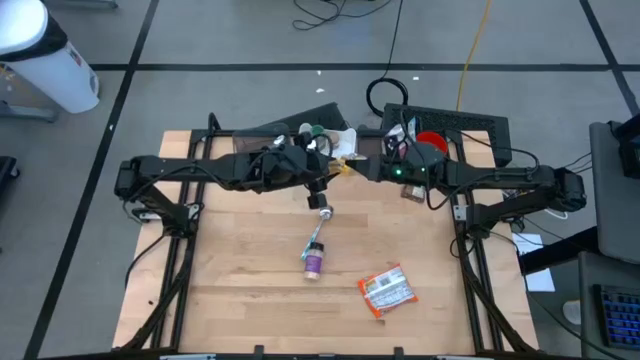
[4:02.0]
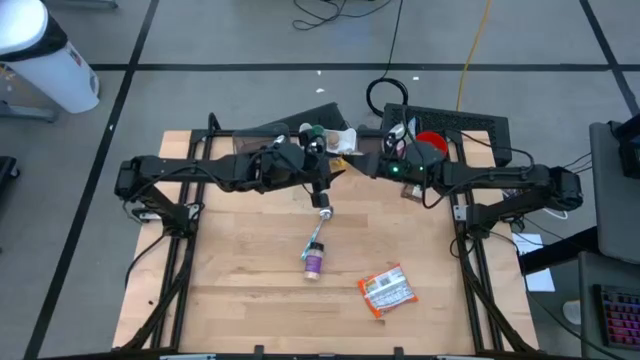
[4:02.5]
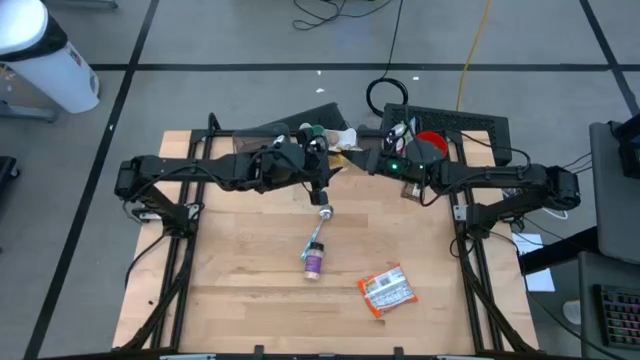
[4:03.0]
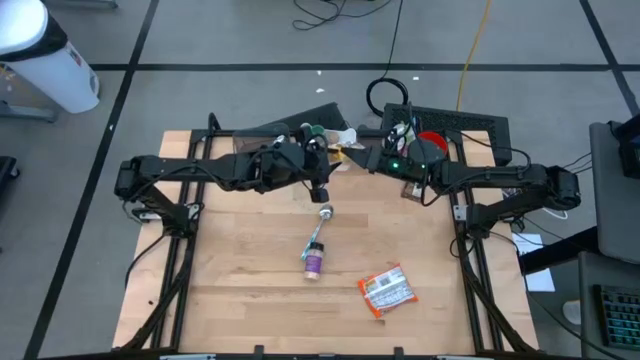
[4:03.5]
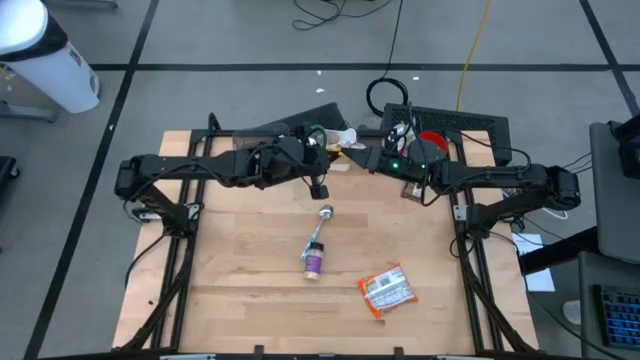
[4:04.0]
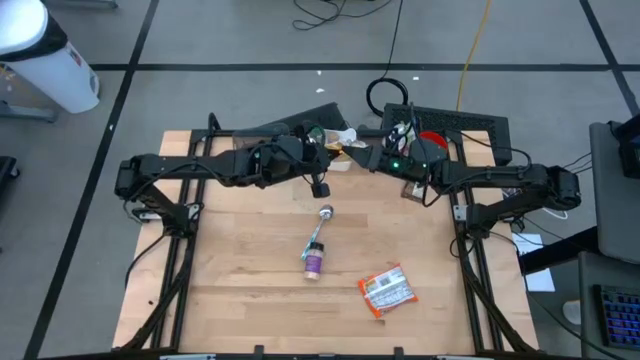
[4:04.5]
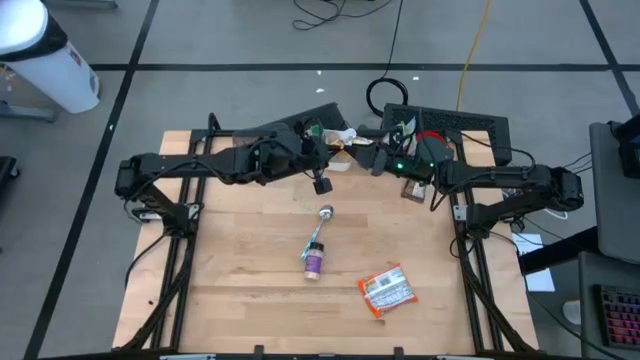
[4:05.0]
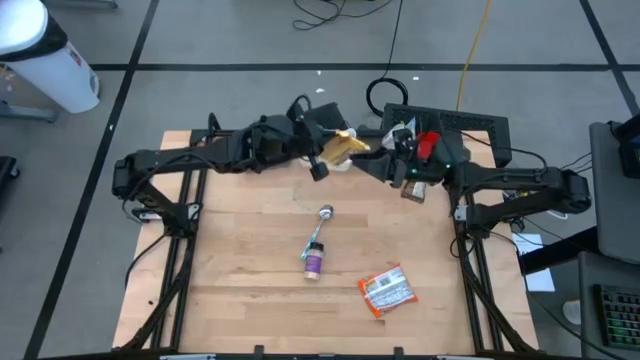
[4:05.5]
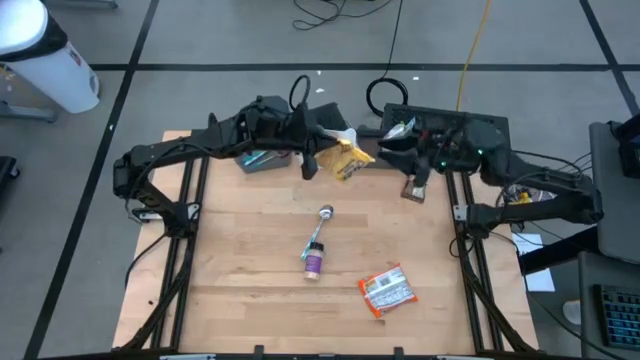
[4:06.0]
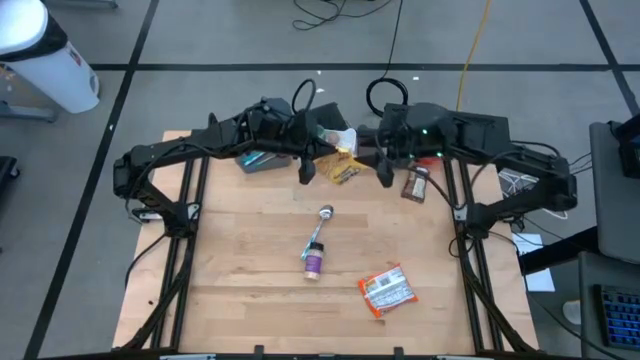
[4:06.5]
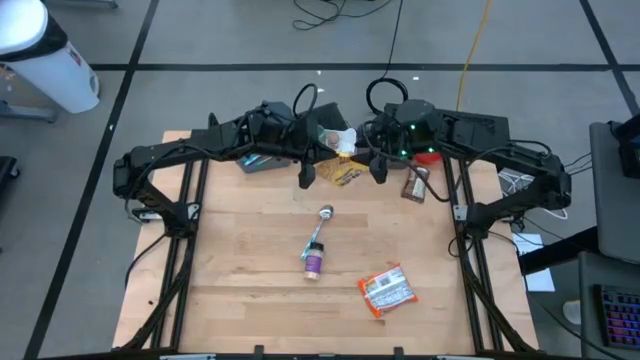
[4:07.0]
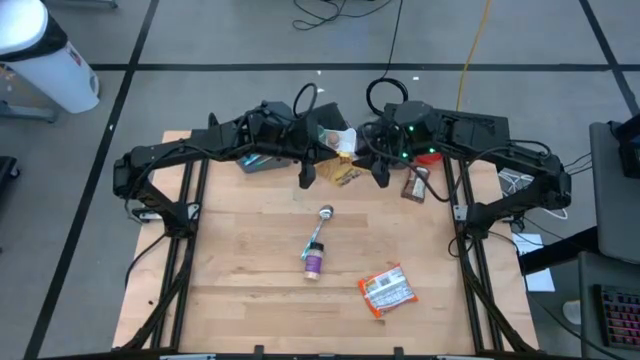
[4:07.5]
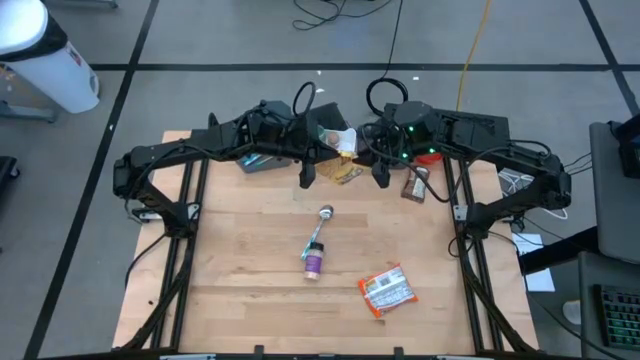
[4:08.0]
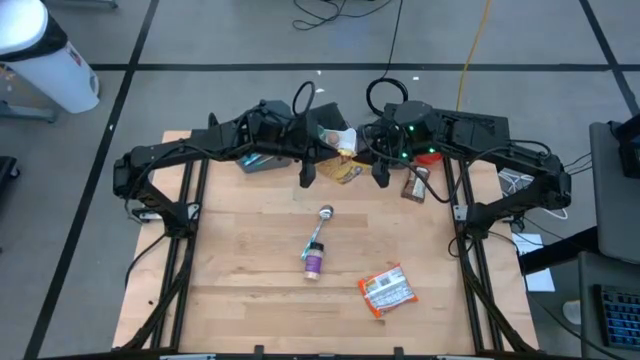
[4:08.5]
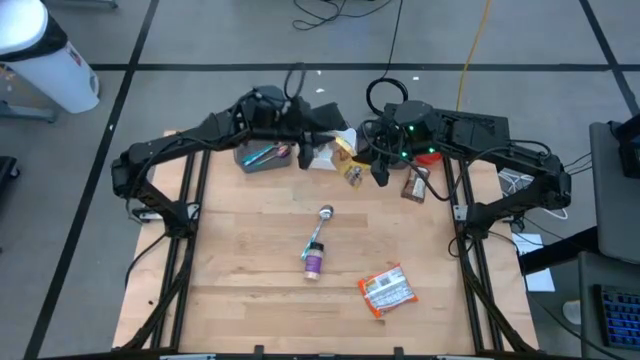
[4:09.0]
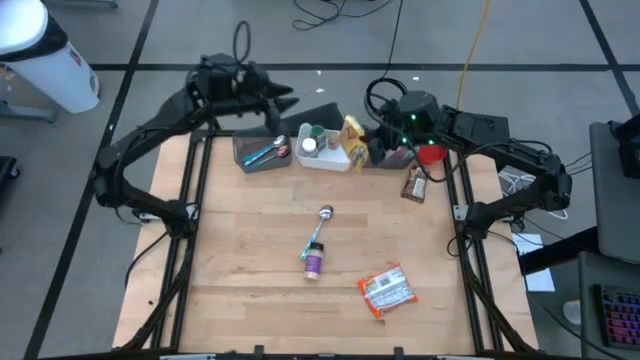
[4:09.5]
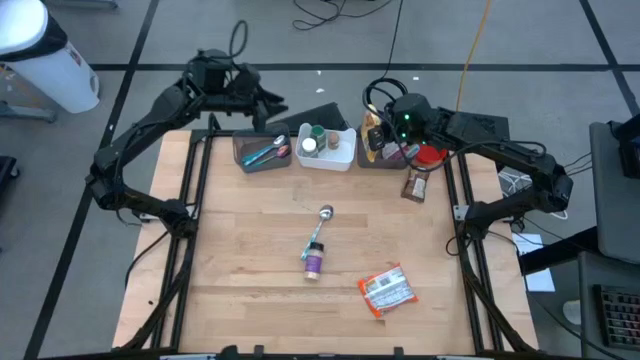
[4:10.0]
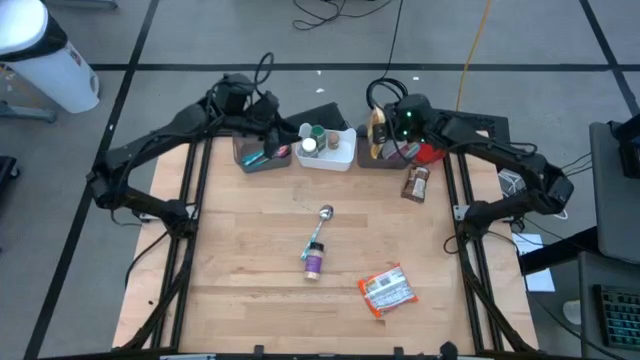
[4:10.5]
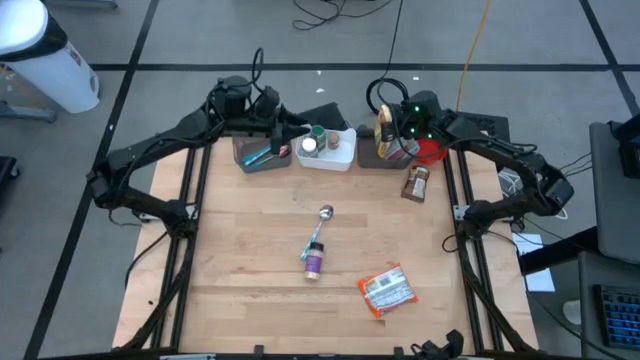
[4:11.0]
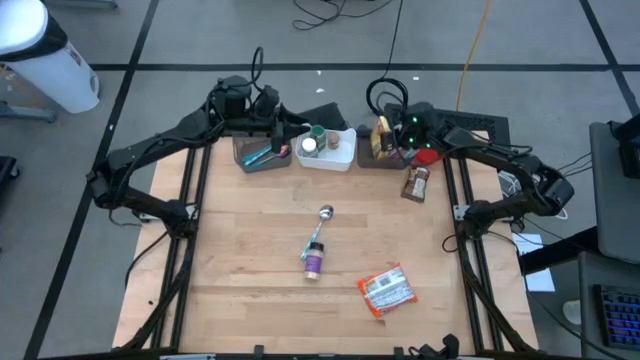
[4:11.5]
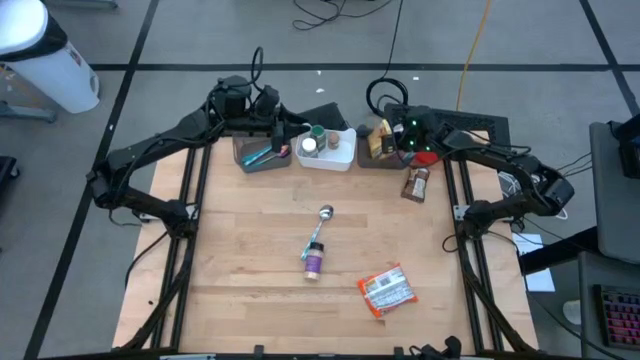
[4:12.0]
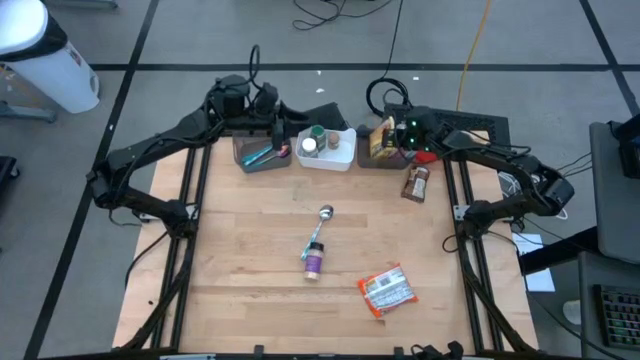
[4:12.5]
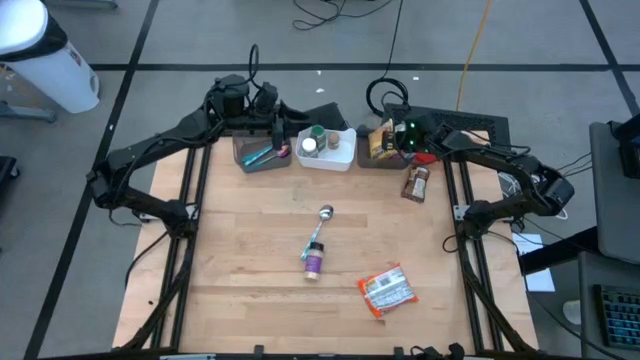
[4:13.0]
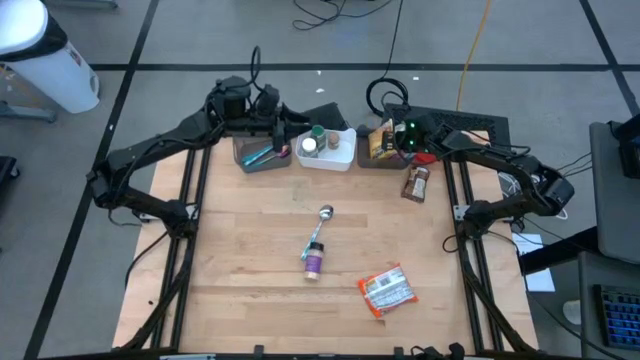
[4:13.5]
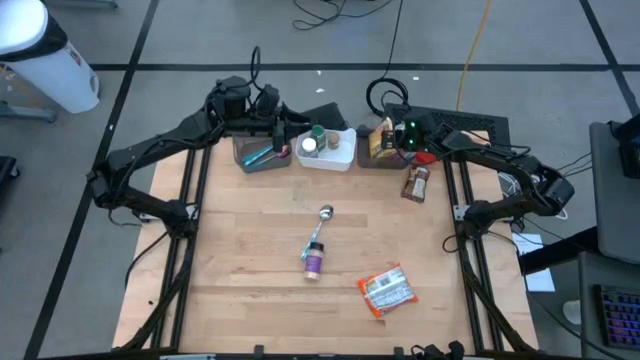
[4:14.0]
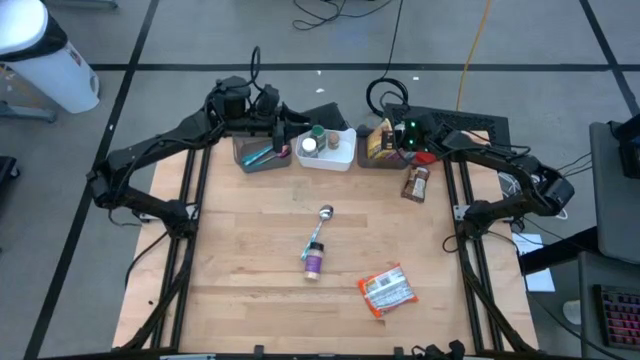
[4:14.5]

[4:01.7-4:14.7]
Task: Pick & Place Food Item
Put the yellow noodle pack into the right black bin

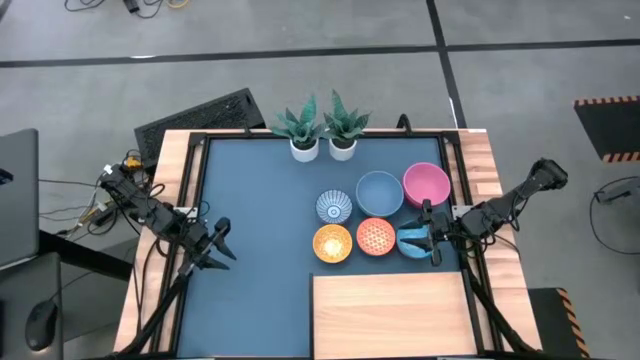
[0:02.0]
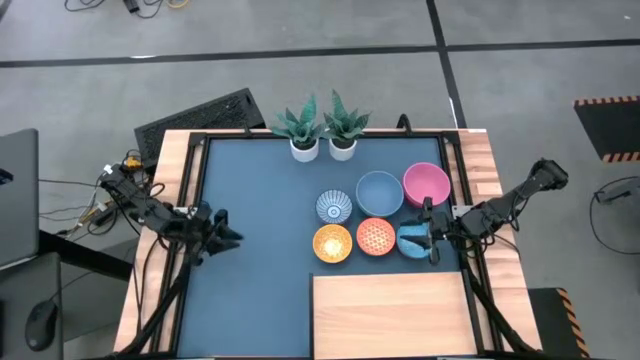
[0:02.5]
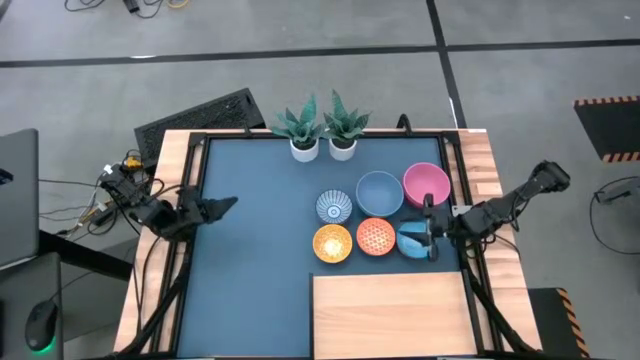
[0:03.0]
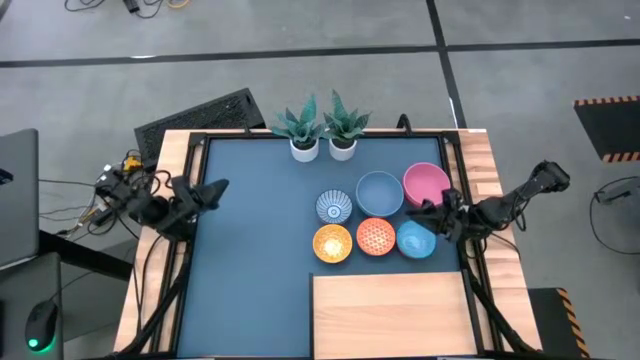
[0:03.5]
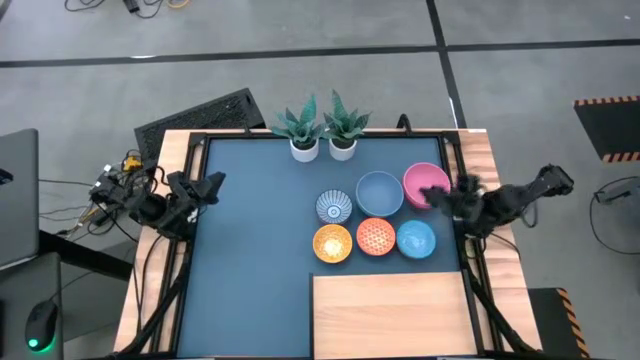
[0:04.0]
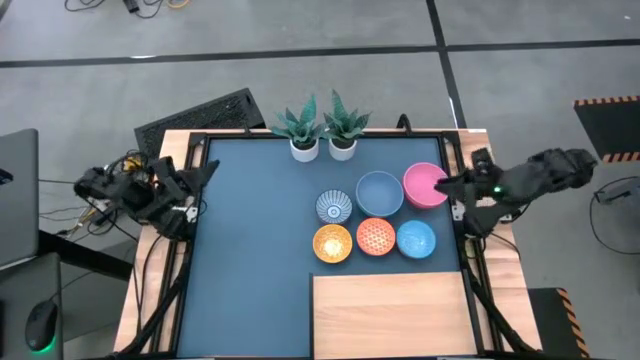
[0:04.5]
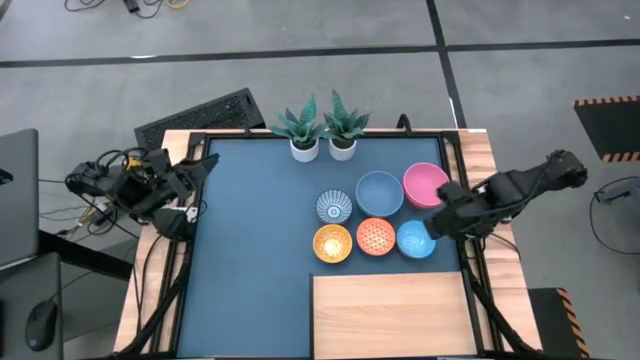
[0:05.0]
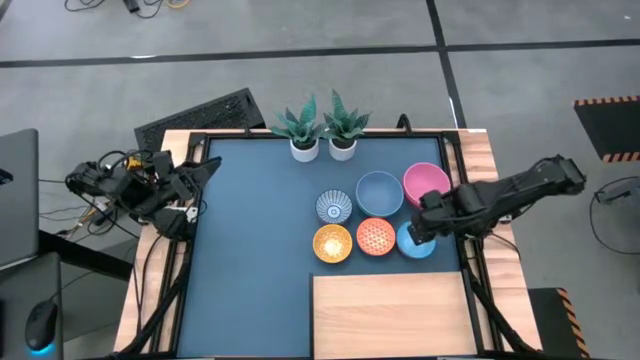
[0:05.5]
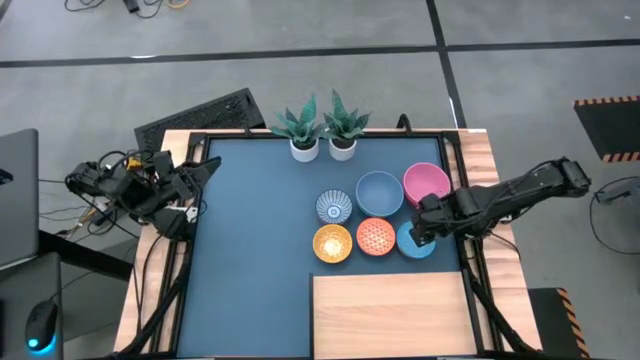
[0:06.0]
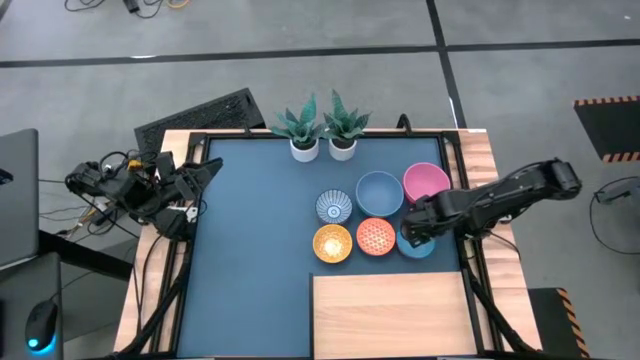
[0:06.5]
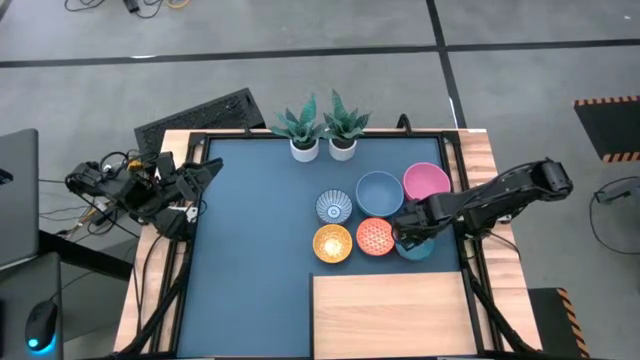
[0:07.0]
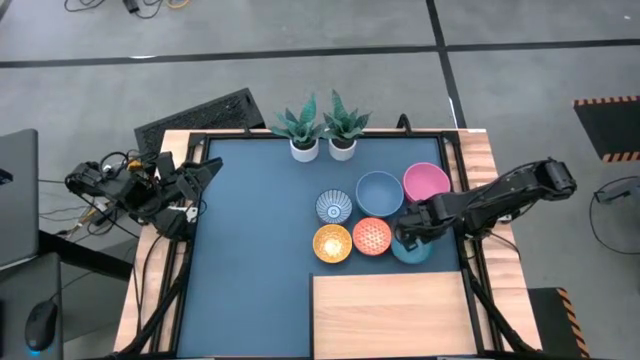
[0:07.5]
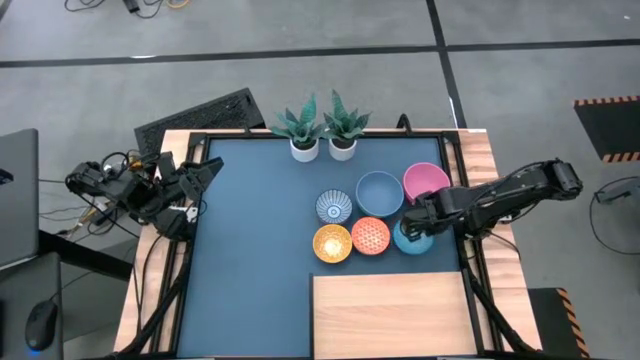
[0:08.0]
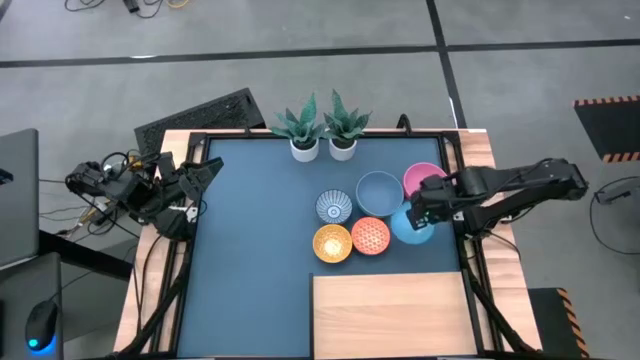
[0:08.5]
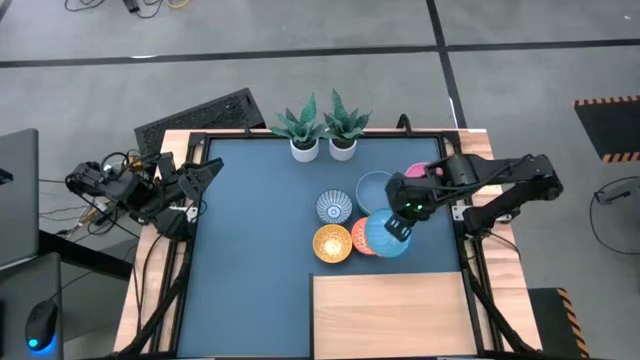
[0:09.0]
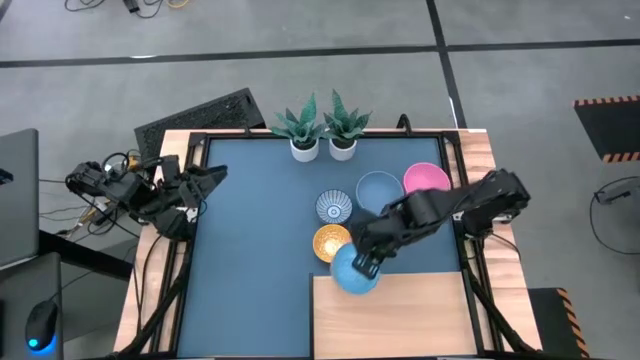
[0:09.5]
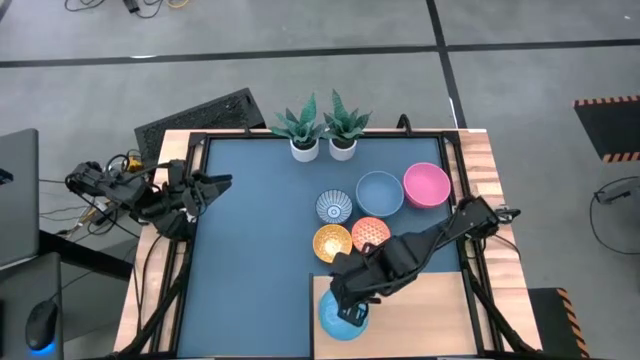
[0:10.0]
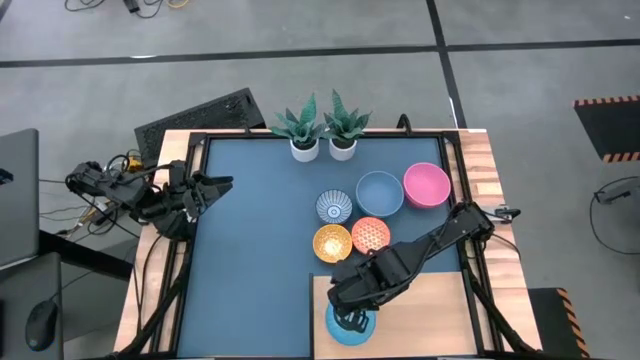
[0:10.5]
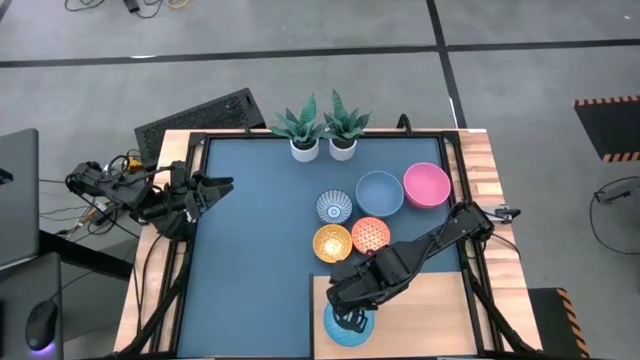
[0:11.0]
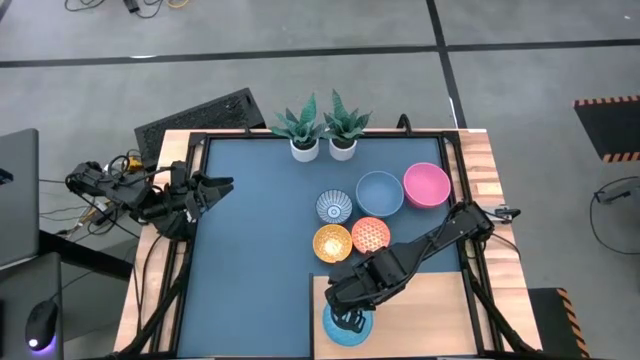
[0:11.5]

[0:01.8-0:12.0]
Task: Place and stack bowls onto a shelf
Put the light blue patterned bowl on the shelf
